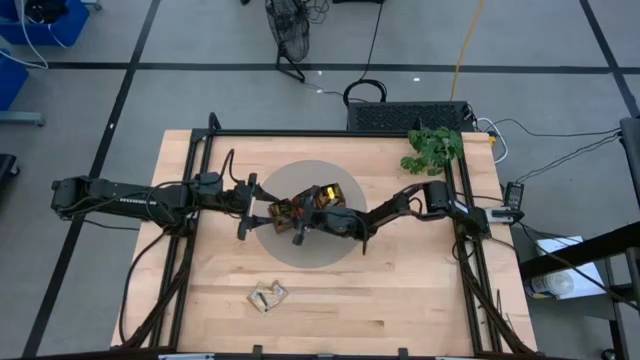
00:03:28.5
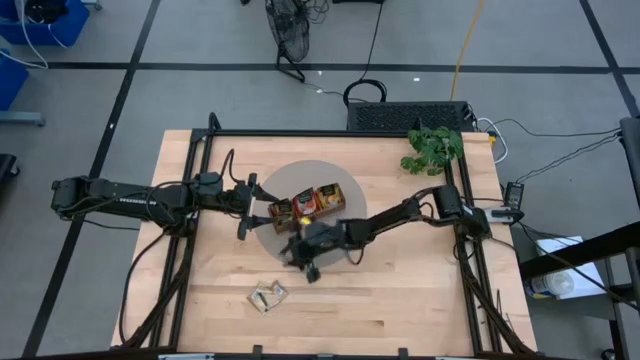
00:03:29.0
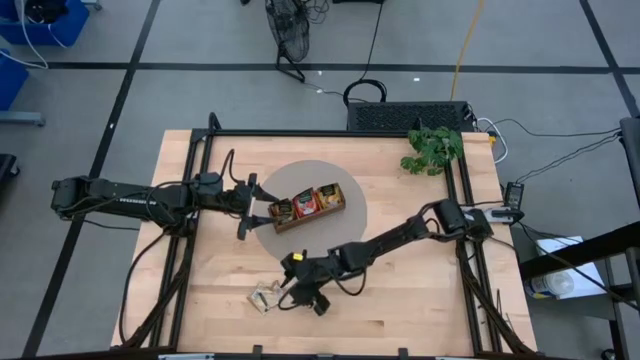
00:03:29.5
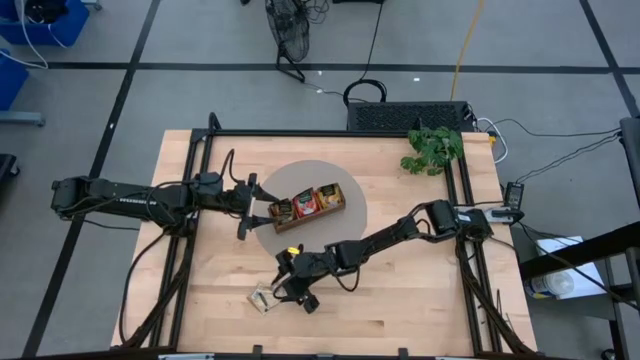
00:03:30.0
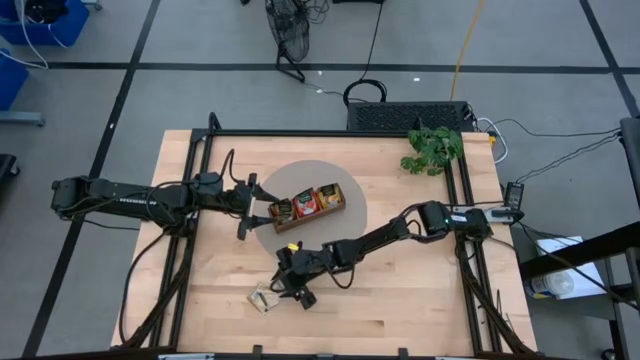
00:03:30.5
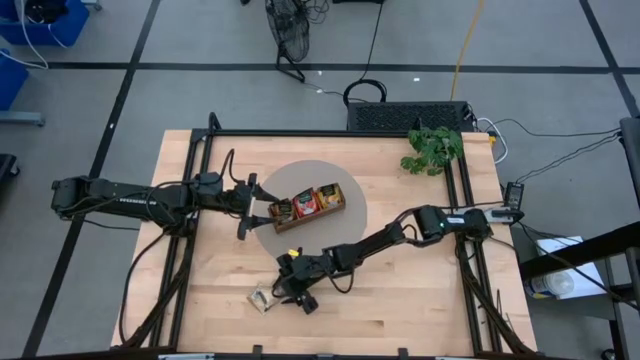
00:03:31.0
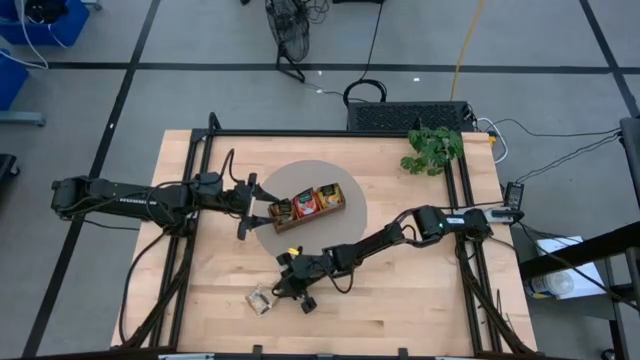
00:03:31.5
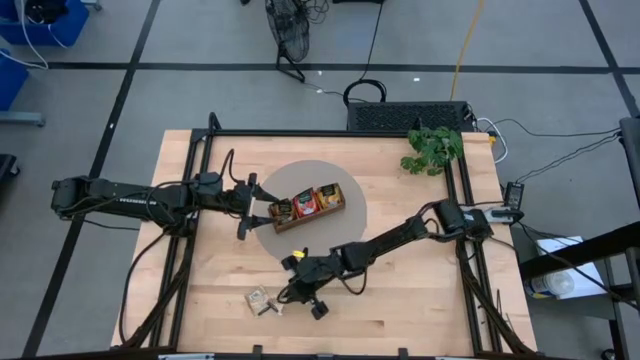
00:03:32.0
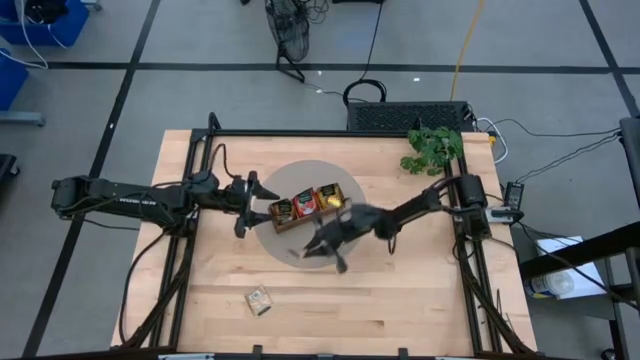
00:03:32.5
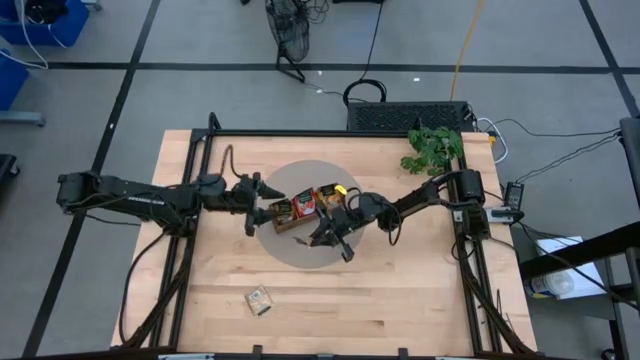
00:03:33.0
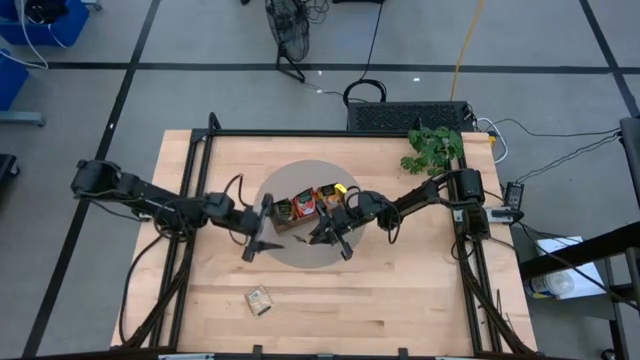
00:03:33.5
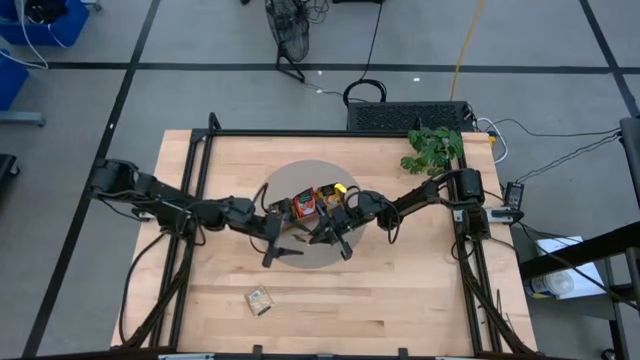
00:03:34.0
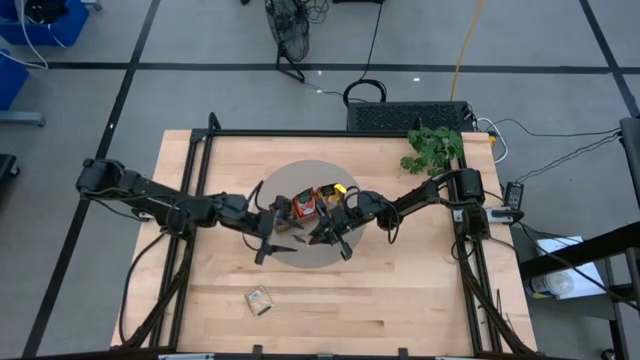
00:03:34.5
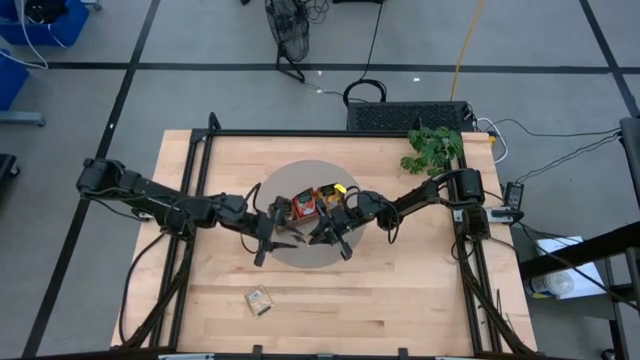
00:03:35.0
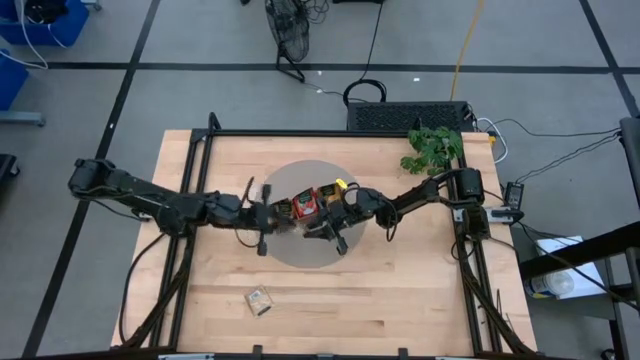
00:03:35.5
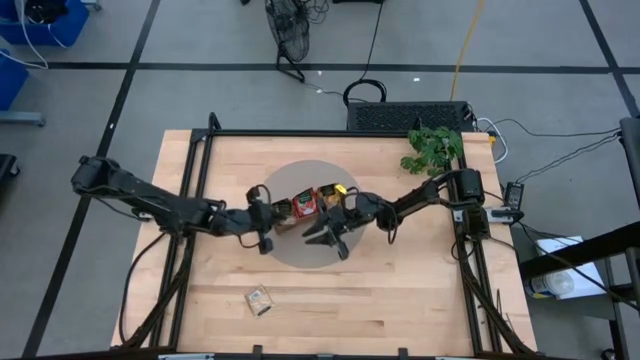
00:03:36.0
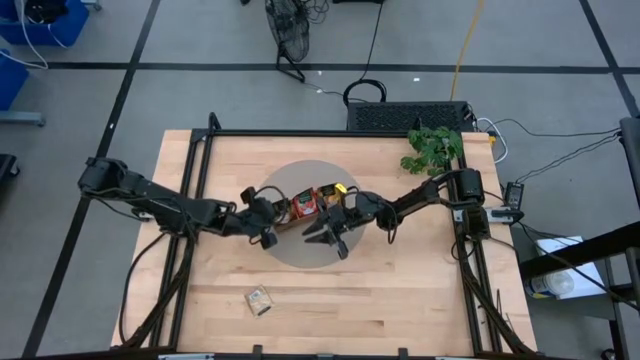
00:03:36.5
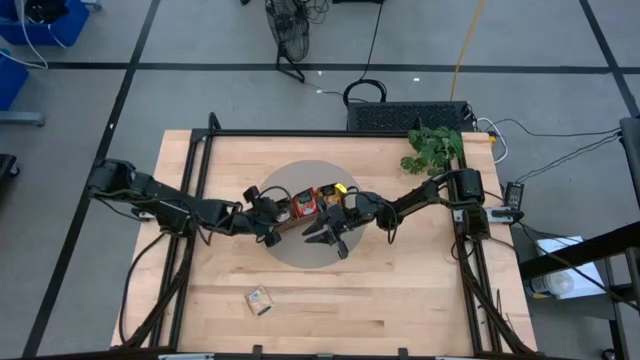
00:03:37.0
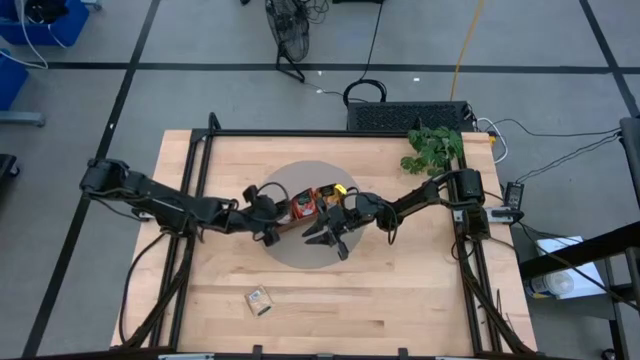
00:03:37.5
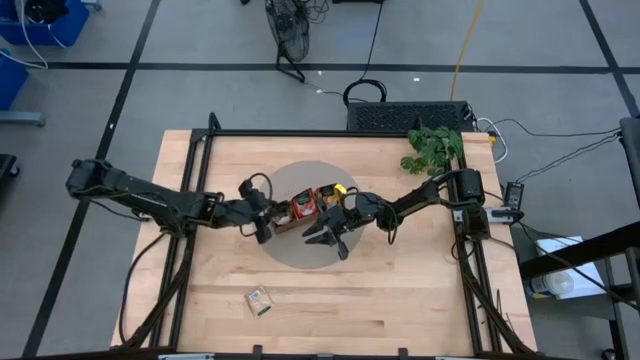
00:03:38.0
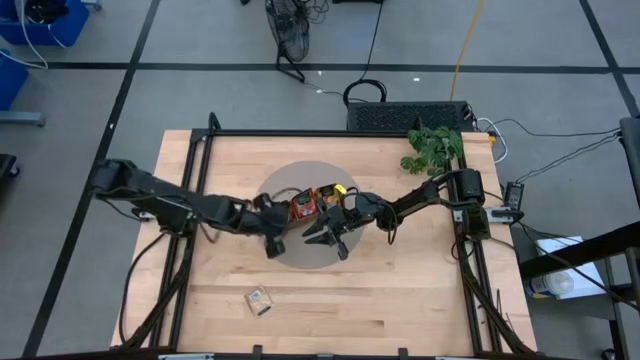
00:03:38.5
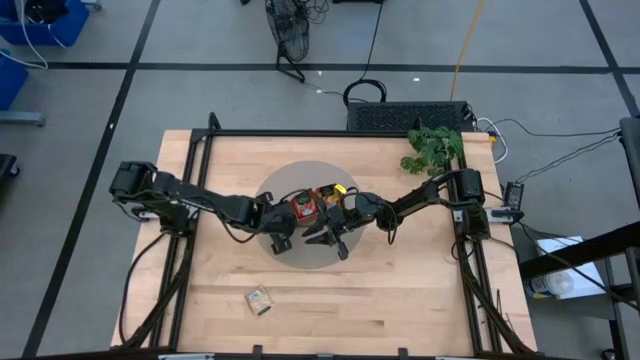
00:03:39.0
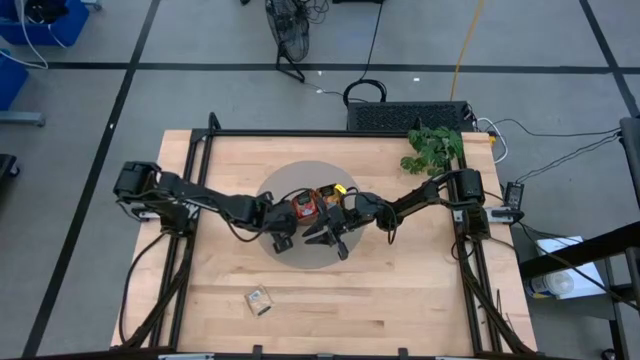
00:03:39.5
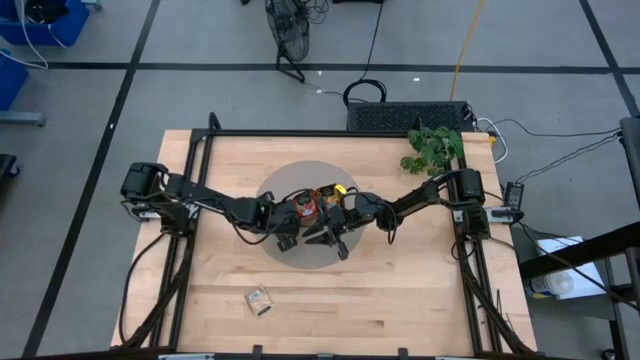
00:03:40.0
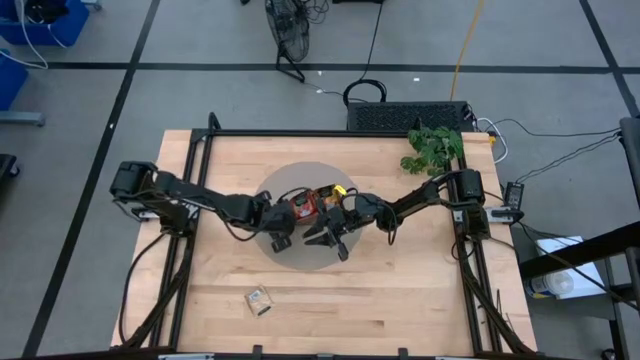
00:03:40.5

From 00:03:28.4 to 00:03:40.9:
Task: Pick & Place Tea
Put the brown tea bag into the wooden organizer

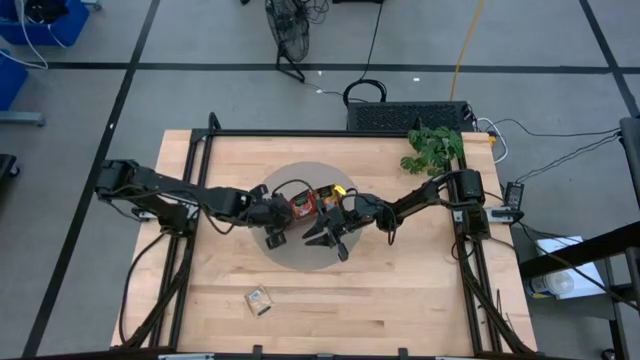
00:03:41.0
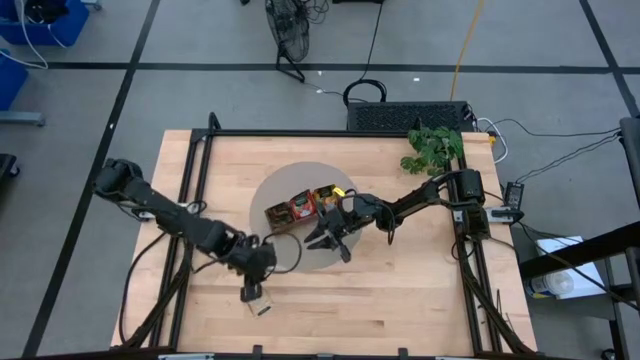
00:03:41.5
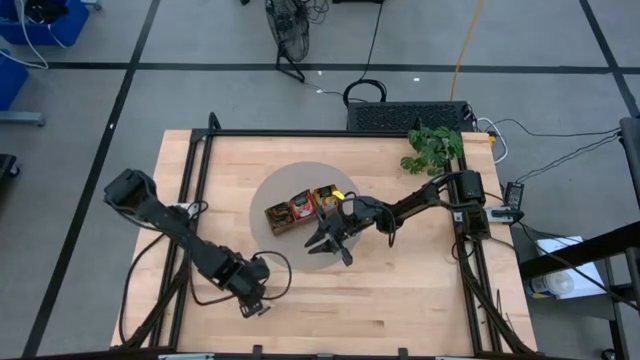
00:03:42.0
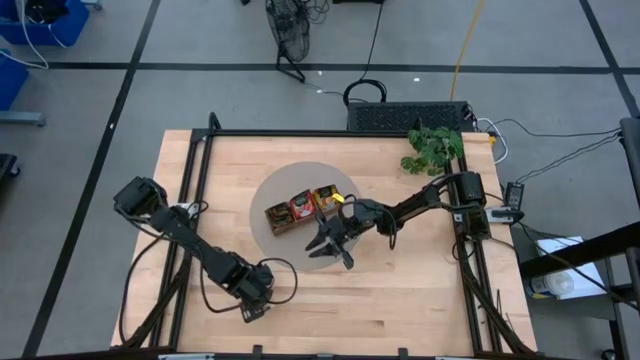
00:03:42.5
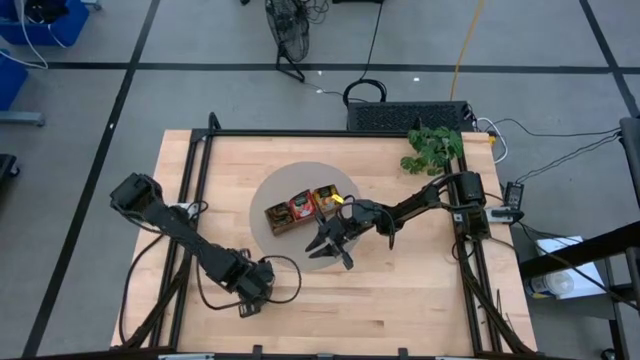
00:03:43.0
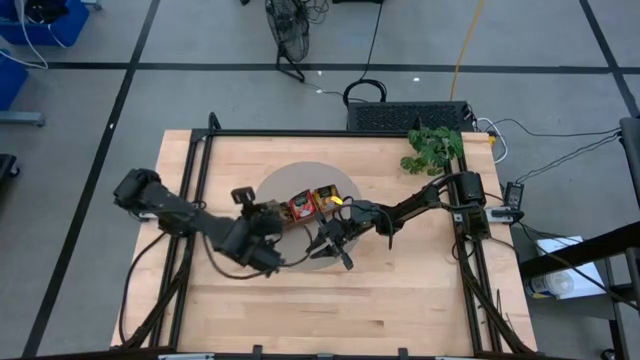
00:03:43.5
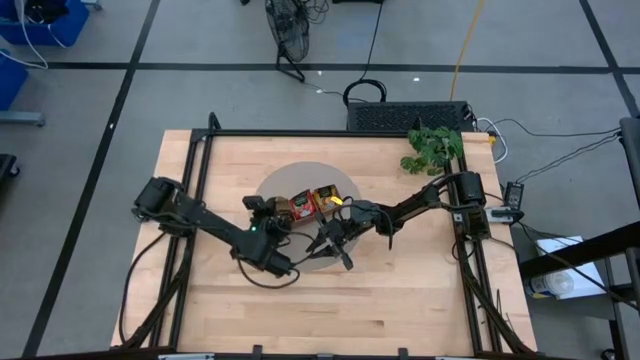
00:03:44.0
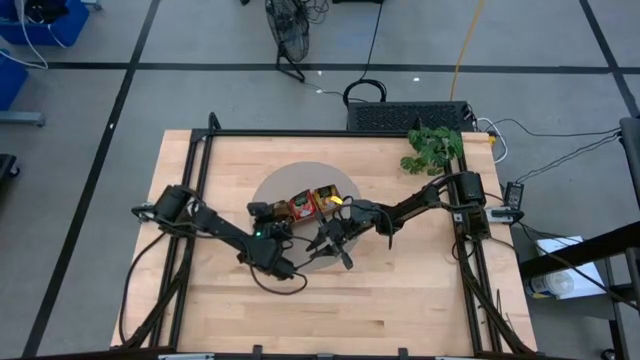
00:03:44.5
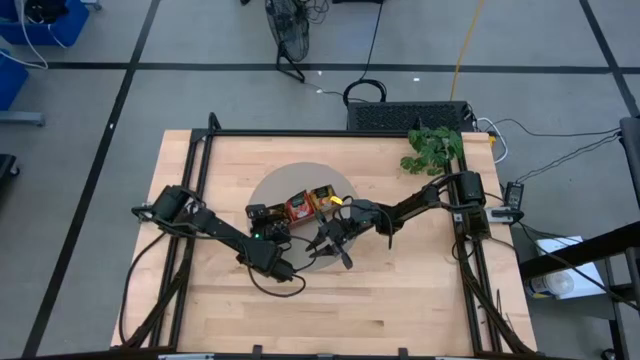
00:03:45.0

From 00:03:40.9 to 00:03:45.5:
Put the brown tea bag into the wooden organizer

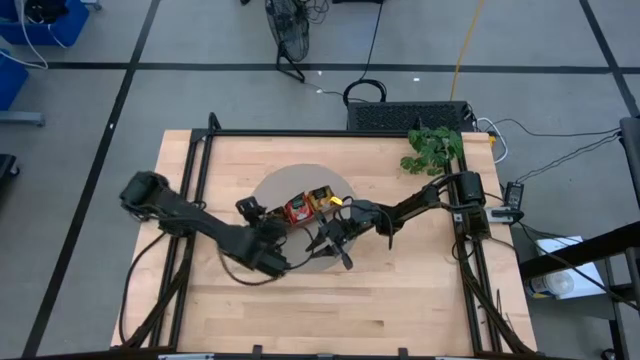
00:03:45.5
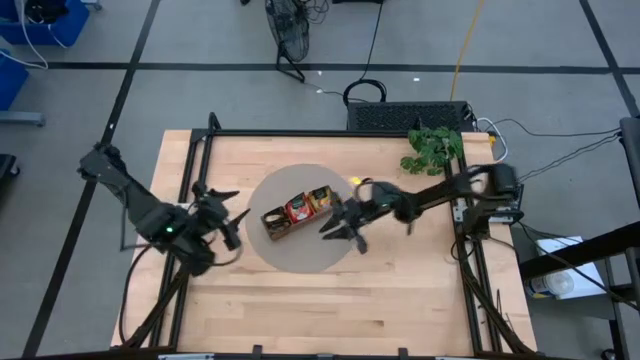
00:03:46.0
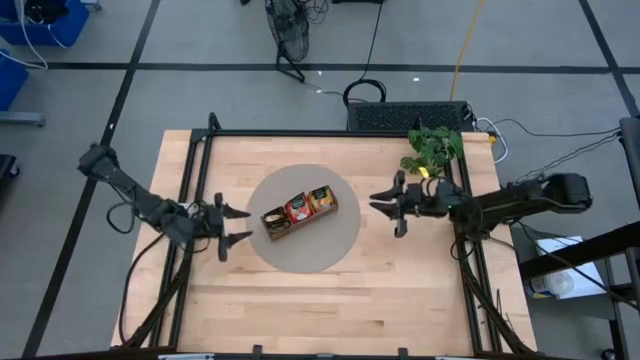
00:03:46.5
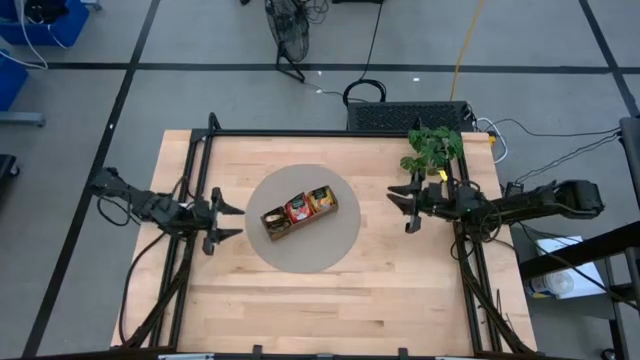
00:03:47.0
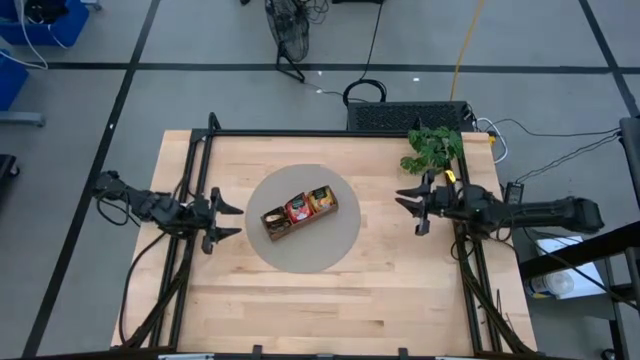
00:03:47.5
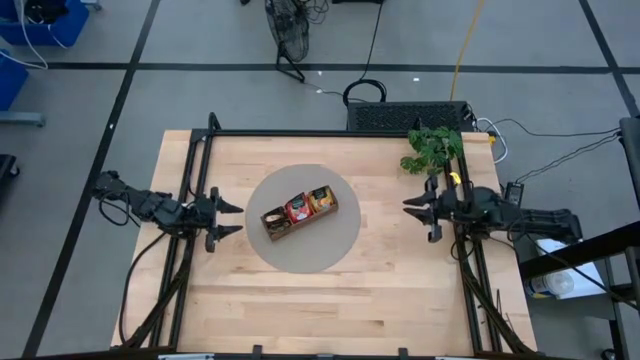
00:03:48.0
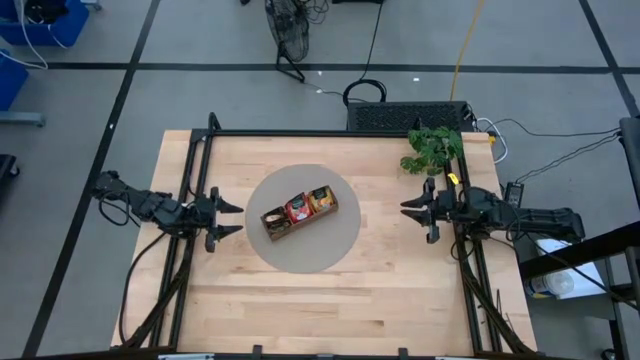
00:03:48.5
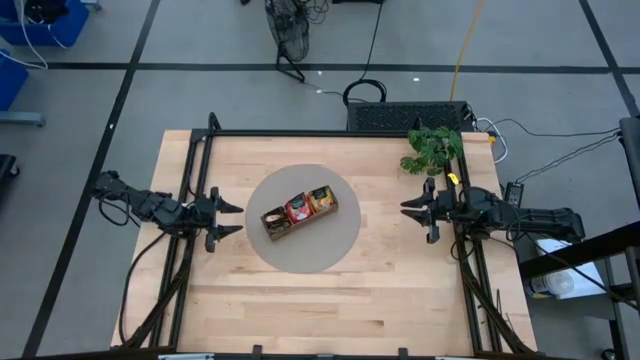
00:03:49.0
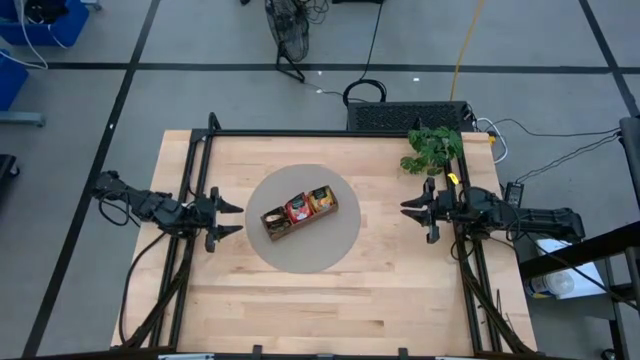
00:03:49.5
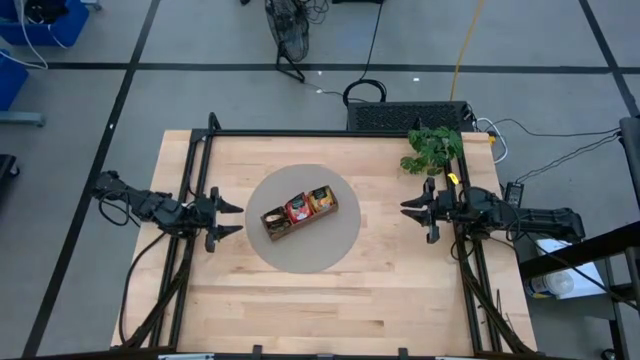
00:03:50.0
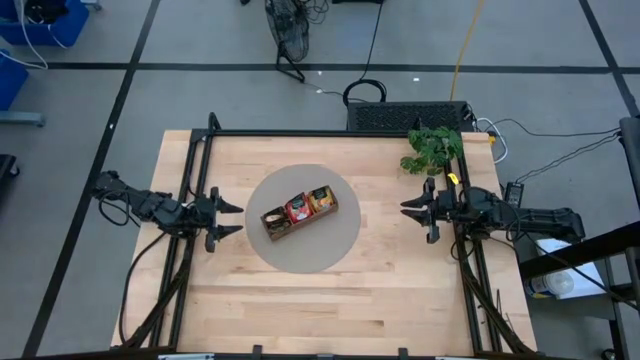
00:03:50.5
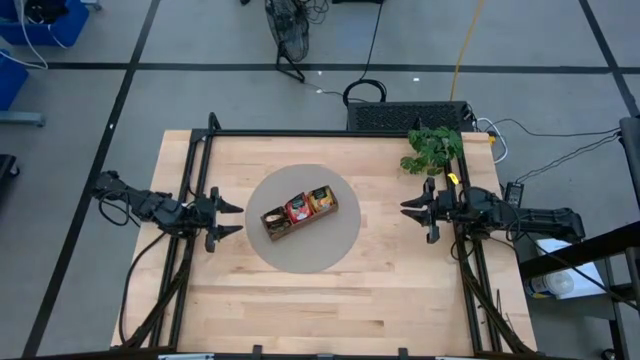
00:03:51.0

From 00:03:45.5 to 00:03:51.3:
Return to Home Position
